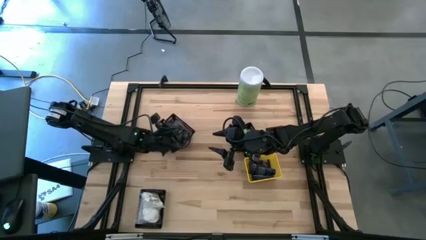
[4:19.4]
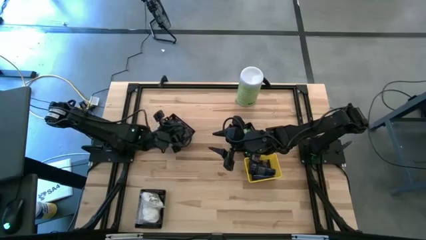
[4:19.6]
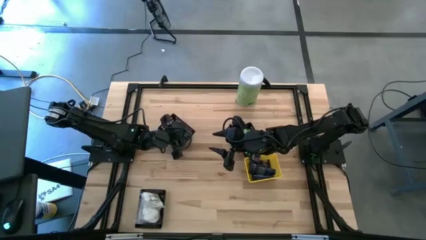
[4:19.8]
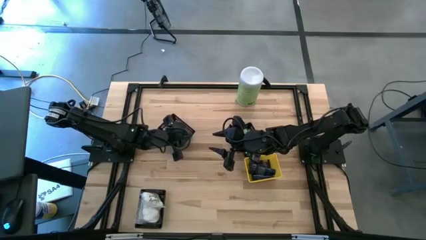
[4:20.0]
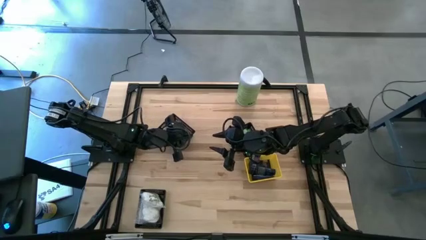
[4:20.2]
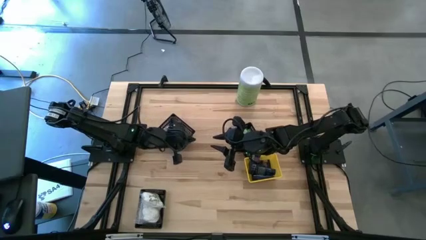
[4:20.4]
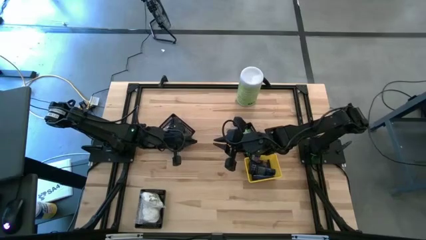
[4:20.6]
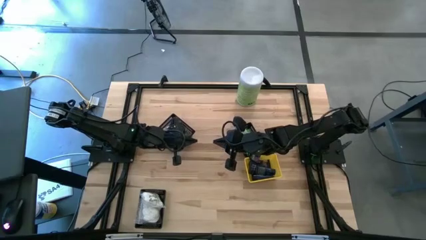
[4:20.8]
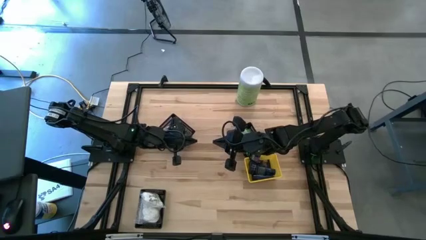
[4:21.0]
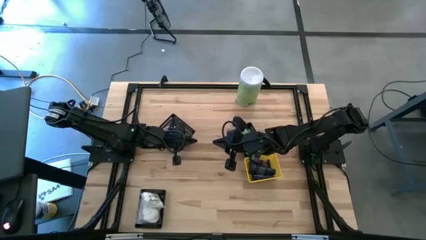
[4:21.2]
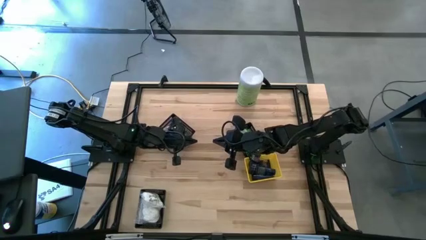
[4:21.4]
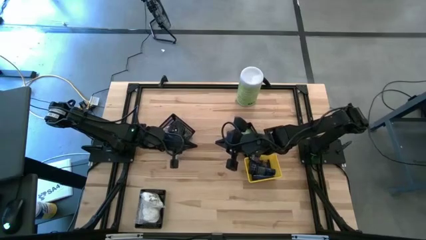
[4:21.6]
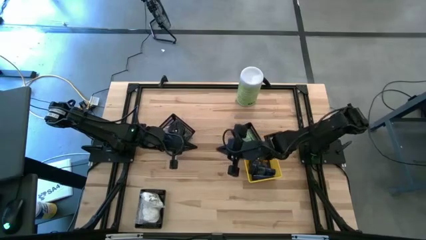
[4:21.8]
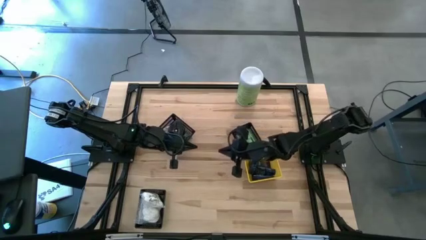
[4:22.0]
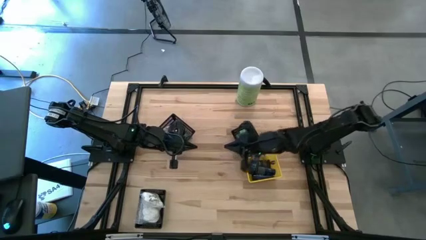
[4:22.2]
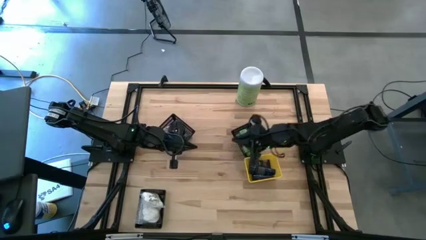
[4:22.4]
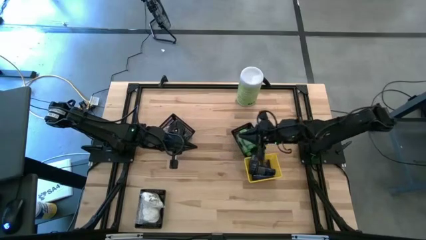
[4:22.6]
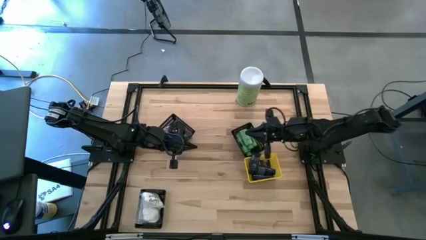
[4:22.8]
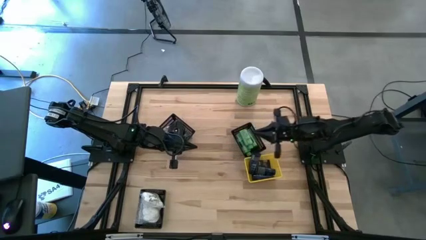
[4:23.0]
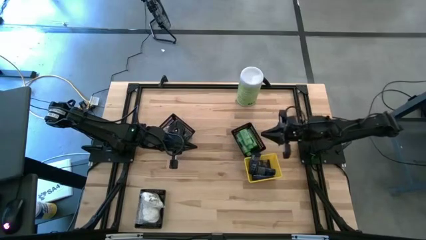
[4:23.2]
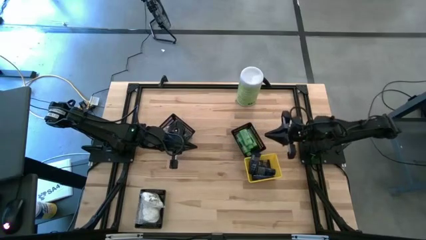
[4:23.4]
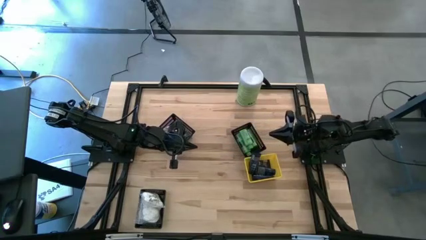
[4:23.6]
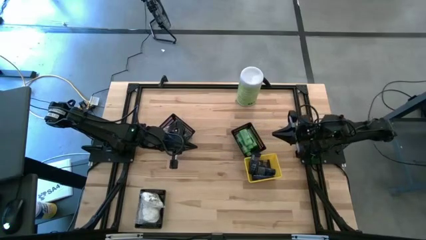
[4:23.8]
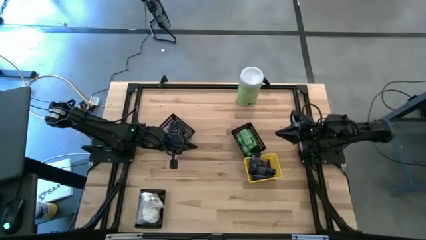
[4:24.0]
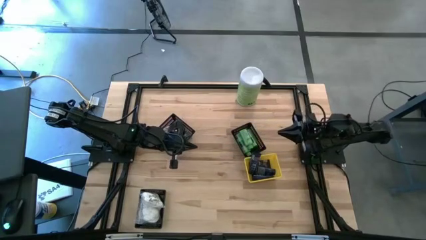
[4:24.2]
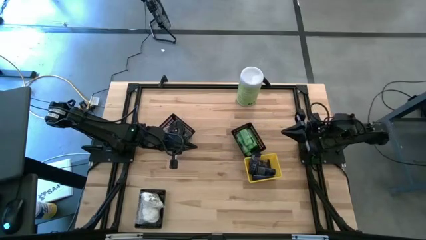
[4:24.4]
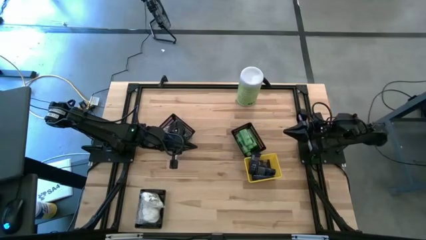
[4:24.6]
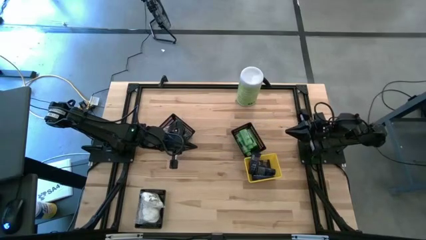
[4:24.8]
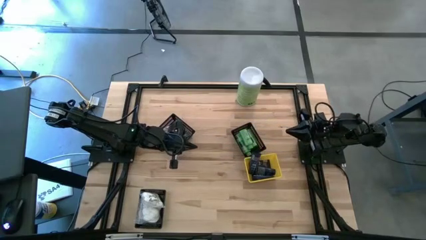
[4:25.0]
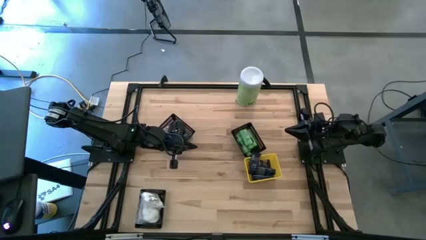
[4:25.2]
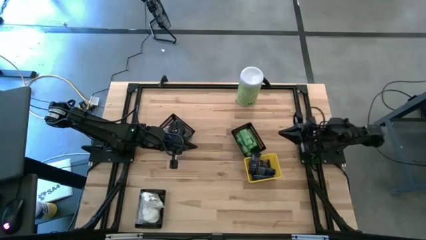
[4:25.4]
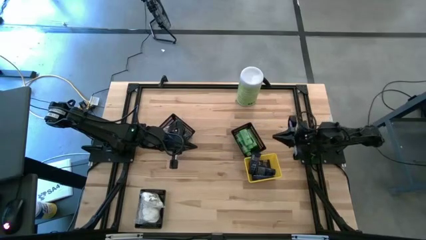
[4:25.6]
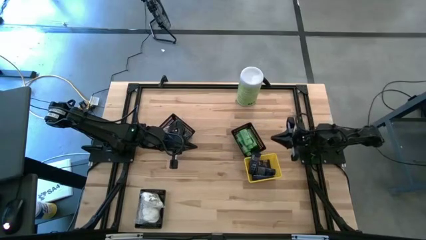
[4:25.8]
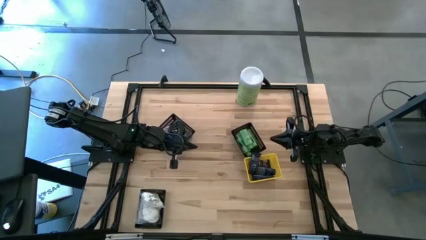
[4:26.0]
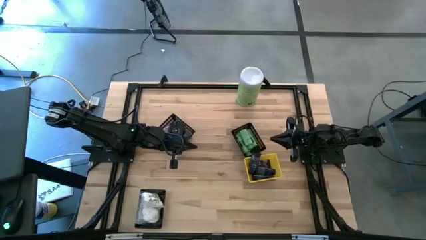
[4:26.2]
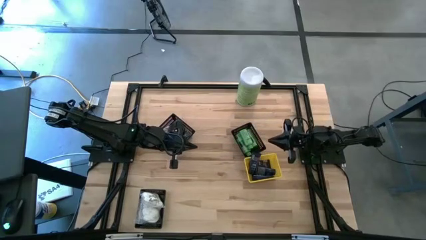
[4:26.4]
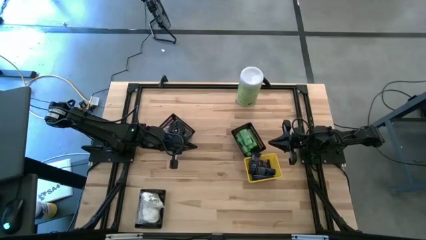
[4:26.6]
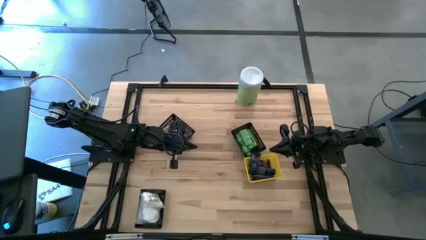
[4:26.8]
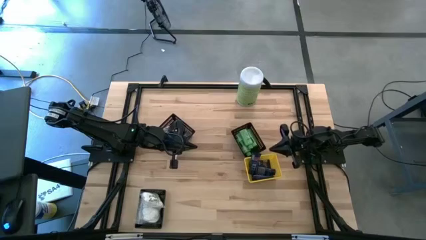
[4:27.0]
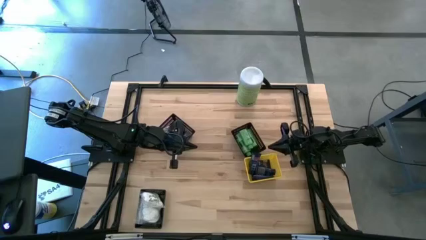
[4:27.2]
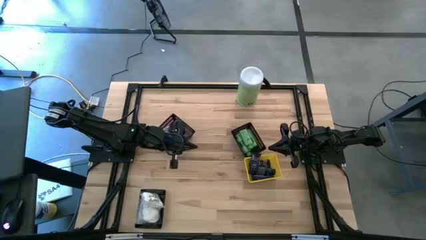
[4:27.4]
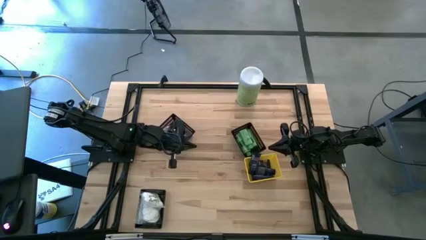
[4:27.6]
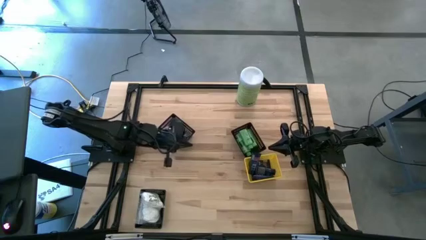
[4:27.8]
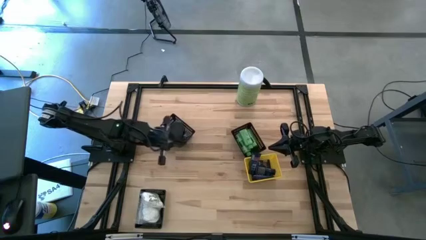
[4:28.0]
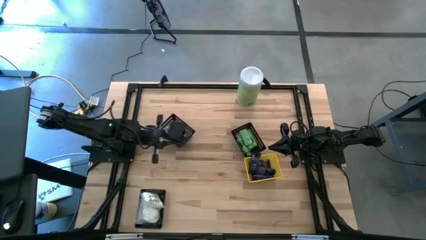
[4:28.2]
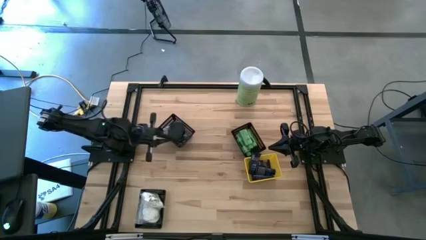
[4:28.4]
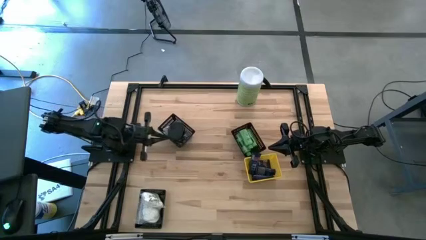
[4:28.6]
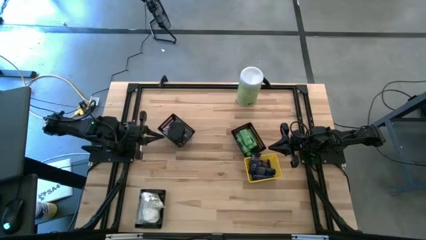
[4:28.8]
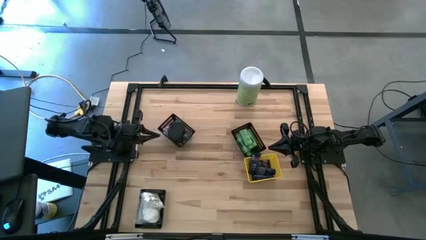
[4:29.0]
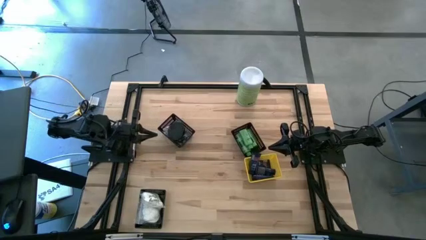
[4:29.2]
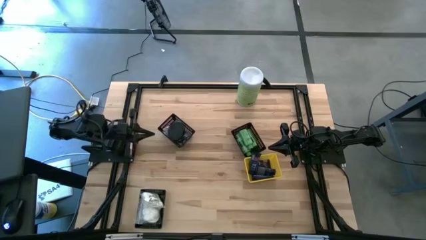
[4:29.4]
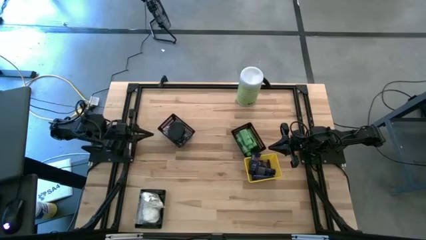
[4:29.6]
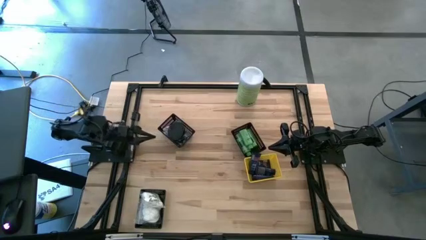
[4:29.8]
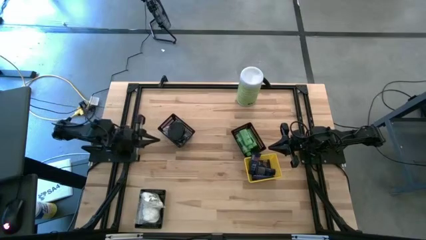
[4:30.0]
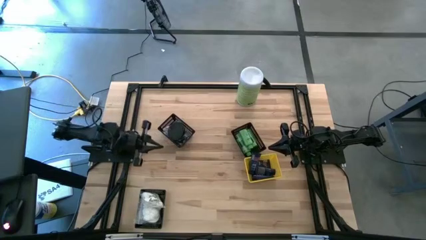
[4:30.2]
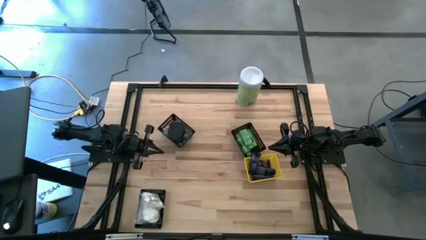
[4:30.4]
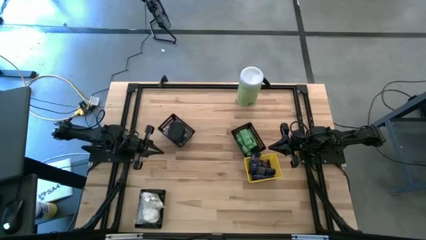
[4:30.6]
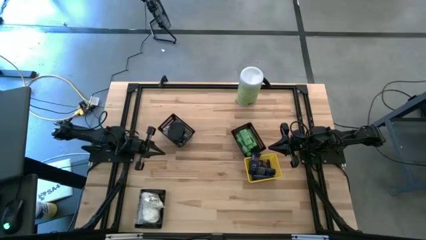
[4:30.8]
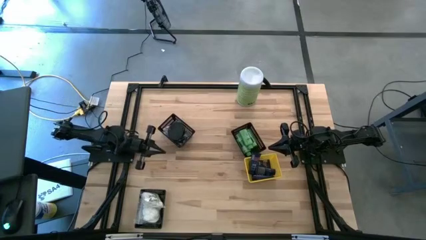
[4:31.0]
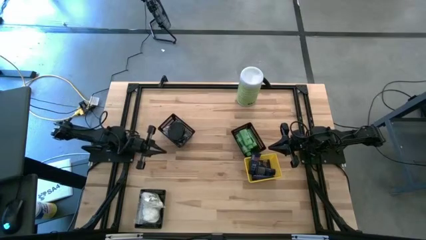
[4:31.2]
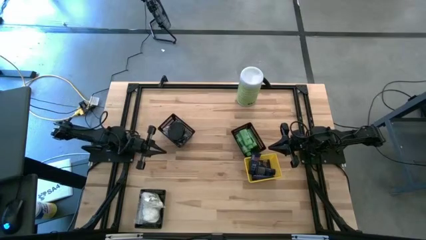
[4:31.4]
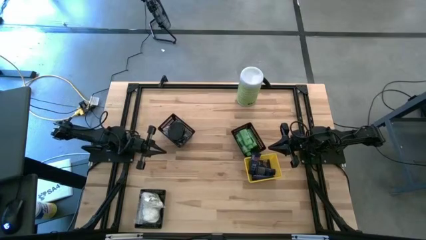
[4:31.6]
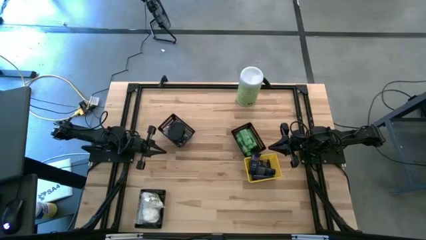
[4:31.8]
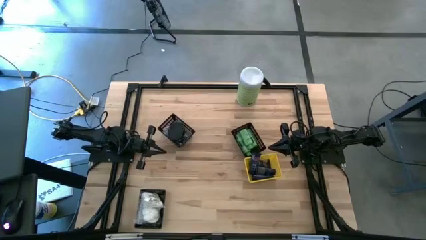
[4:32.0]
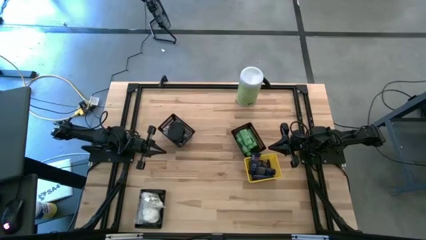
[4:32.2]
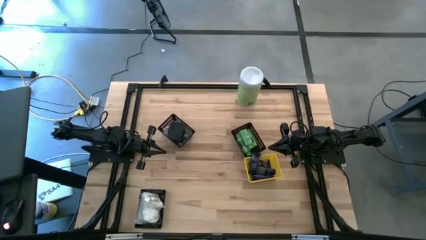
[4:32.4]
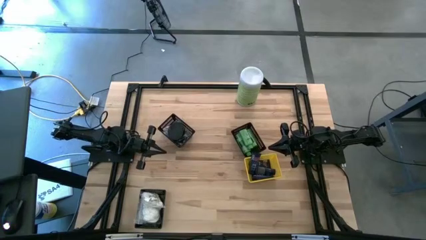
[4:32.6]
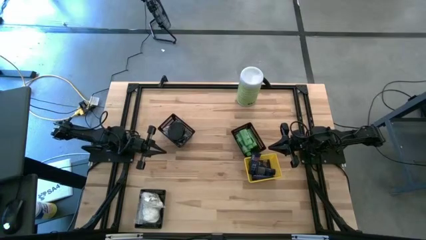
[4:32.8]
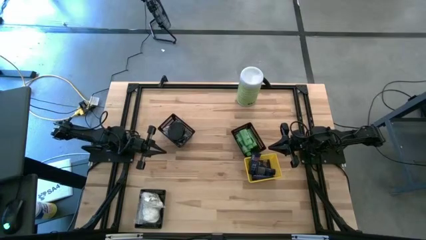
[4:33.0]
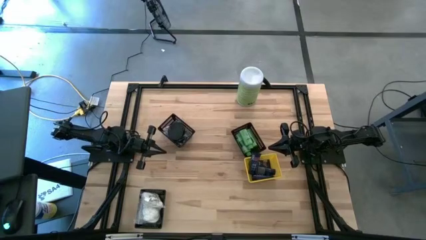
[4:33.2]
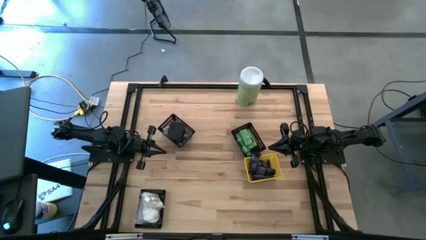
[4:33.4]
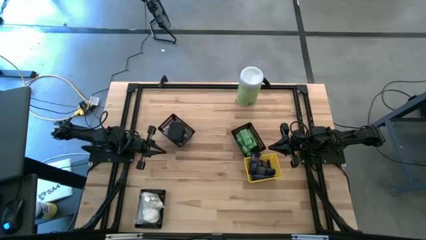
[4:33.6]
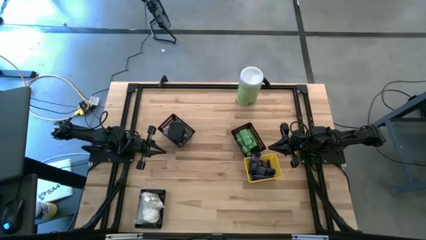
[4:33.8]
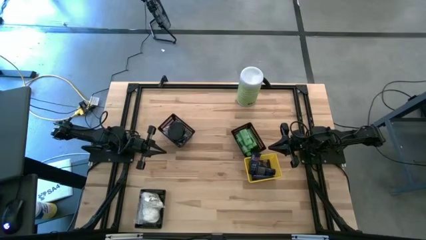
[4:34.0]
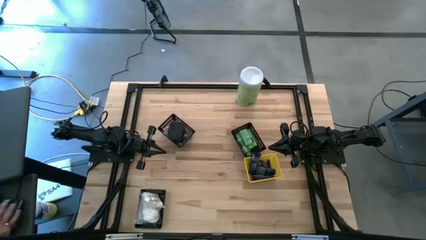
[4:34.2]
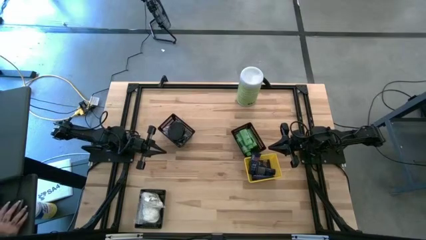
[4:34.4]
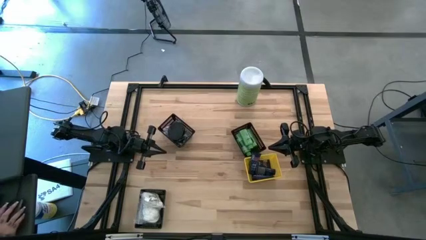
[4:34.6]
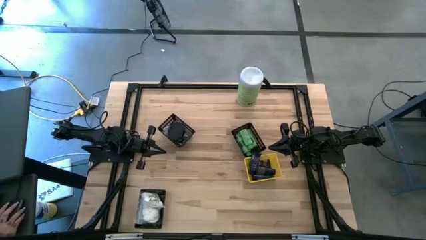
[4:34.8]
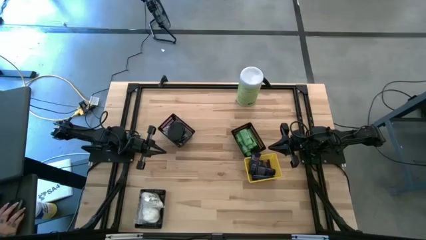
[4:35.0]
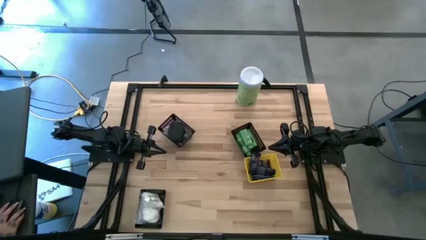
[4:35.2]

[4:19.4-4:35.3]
Task: Pick & Place Travel size toiletries
Return to Home Position
